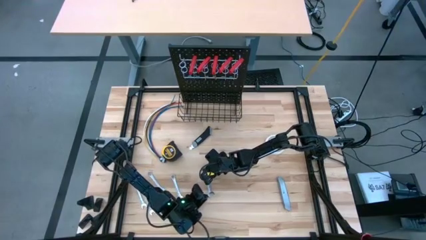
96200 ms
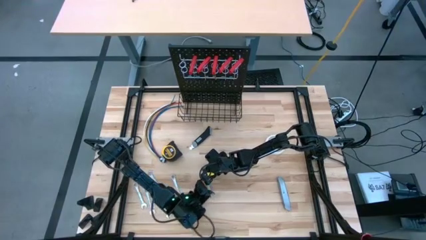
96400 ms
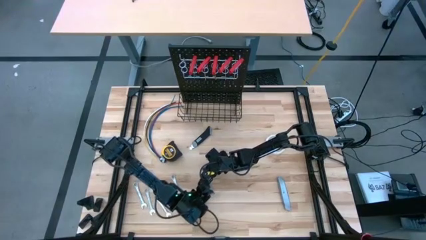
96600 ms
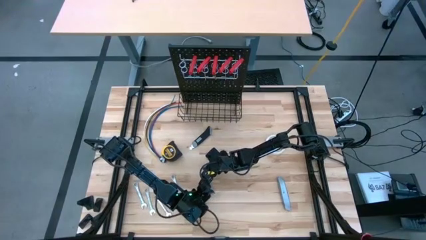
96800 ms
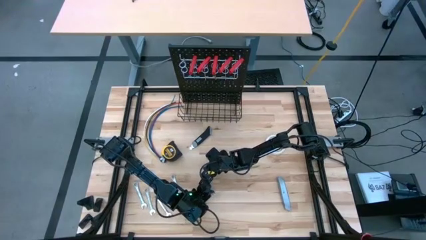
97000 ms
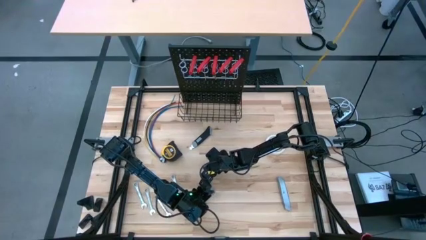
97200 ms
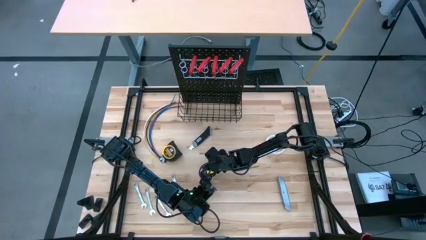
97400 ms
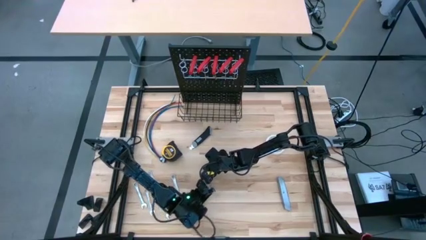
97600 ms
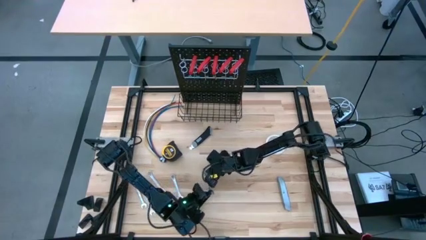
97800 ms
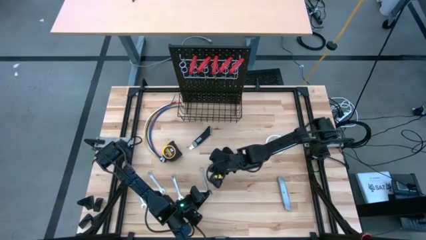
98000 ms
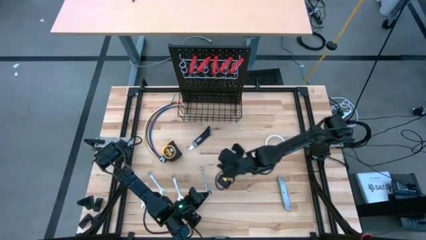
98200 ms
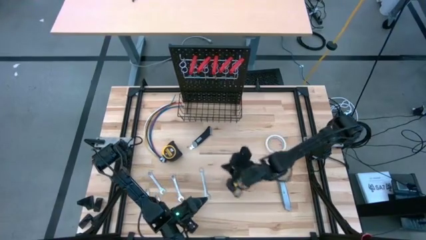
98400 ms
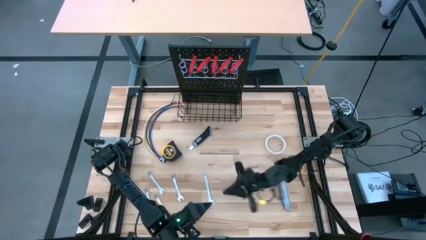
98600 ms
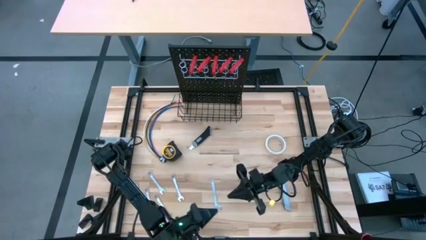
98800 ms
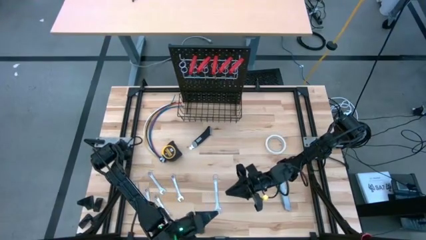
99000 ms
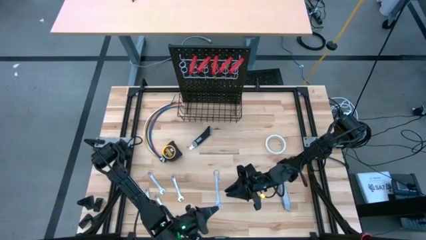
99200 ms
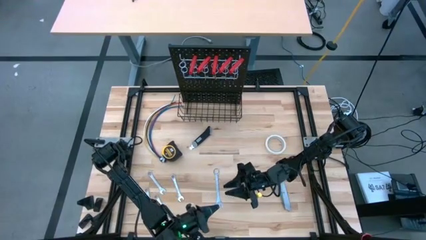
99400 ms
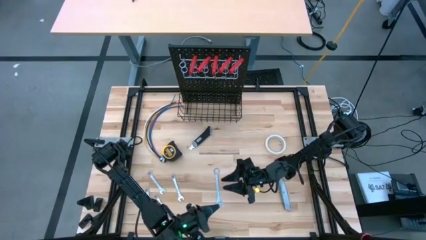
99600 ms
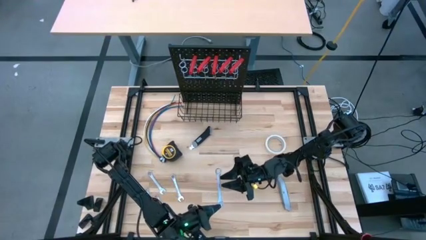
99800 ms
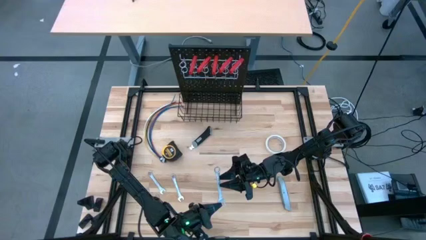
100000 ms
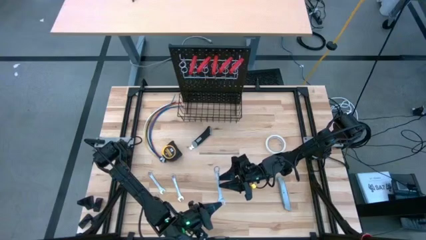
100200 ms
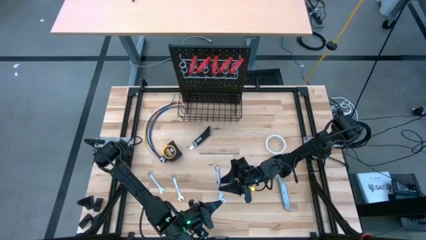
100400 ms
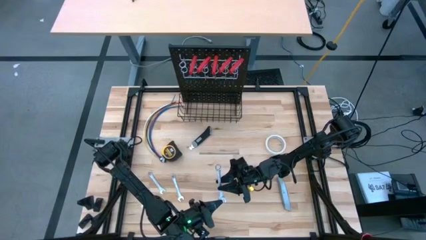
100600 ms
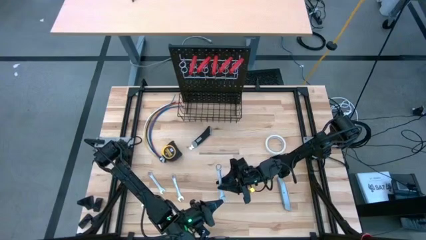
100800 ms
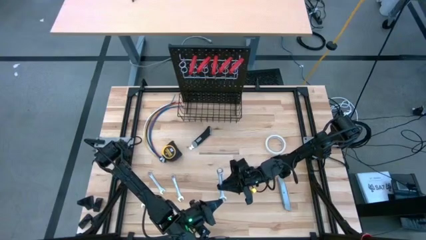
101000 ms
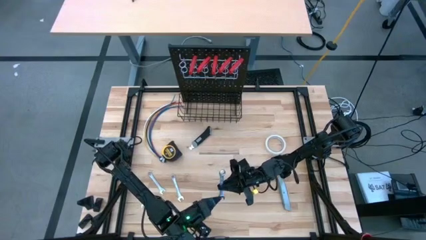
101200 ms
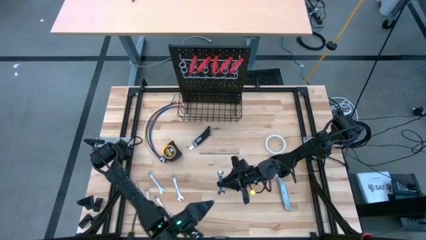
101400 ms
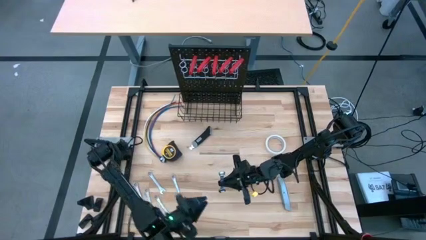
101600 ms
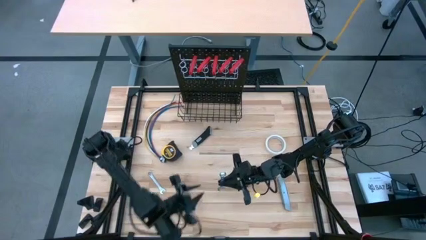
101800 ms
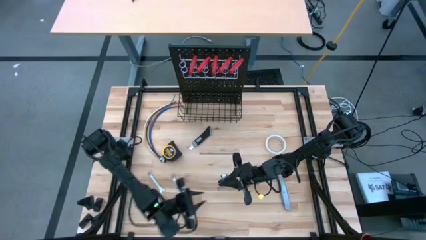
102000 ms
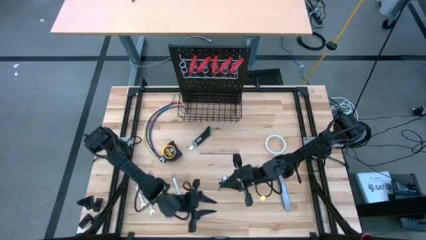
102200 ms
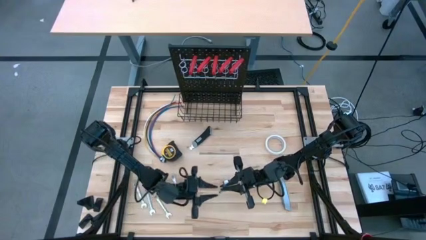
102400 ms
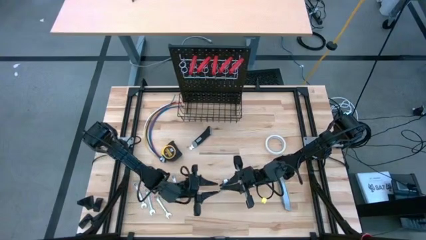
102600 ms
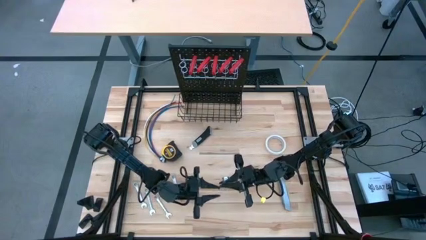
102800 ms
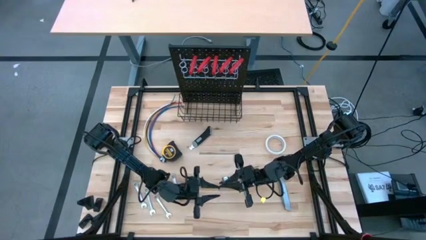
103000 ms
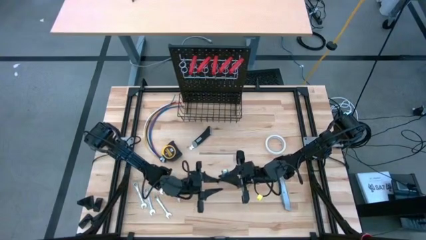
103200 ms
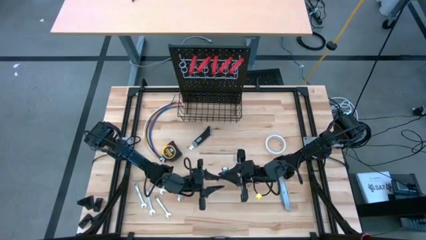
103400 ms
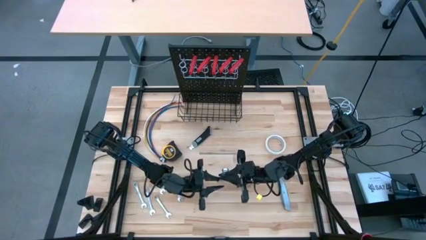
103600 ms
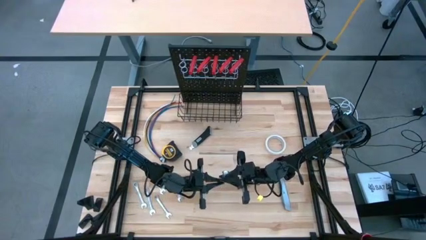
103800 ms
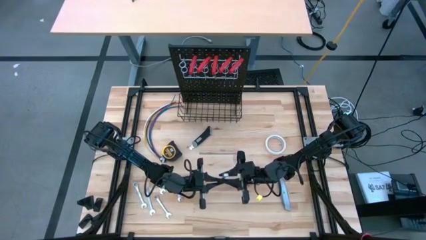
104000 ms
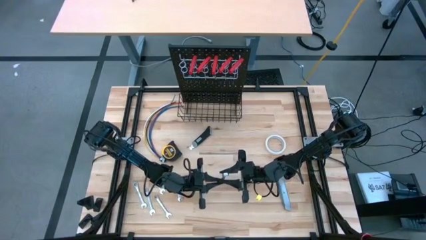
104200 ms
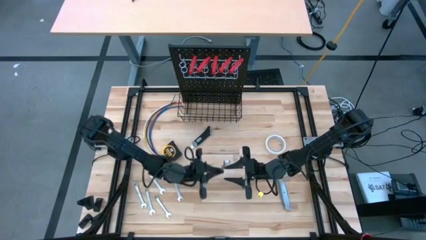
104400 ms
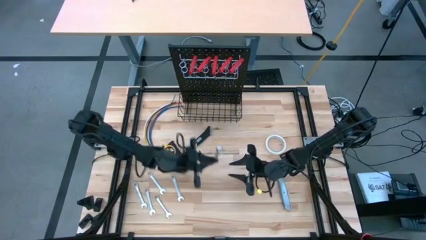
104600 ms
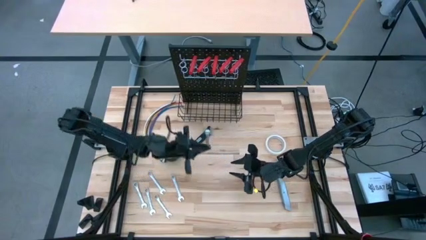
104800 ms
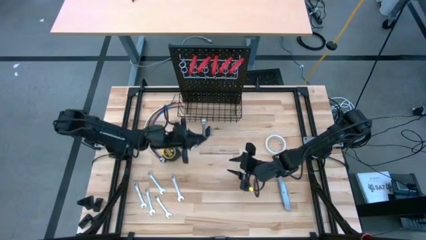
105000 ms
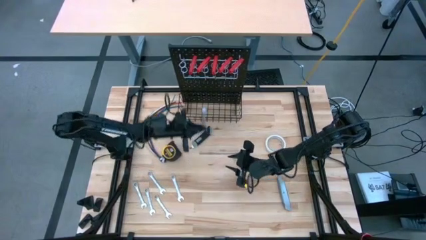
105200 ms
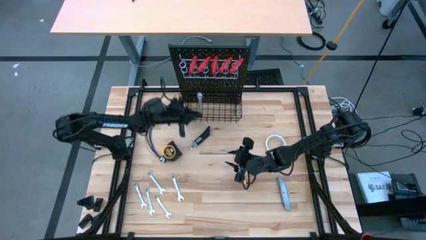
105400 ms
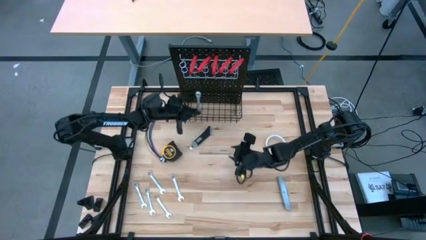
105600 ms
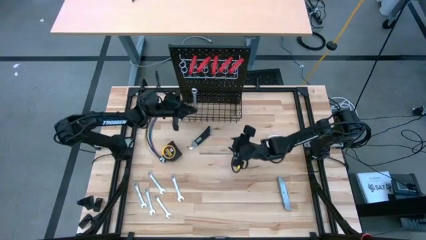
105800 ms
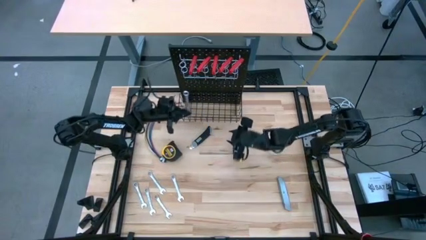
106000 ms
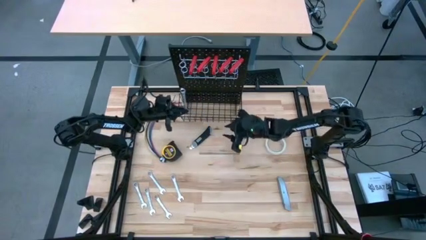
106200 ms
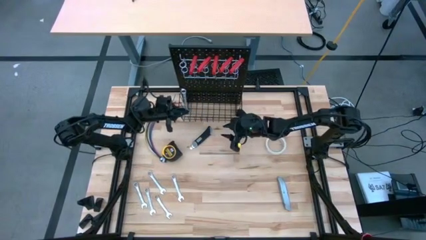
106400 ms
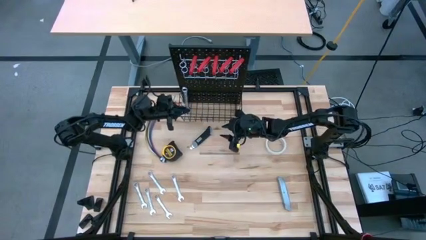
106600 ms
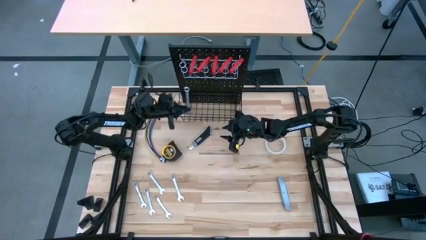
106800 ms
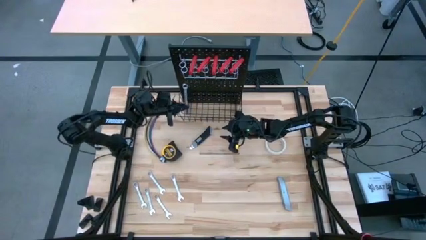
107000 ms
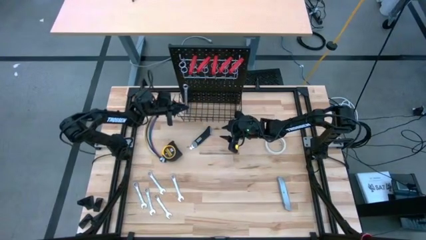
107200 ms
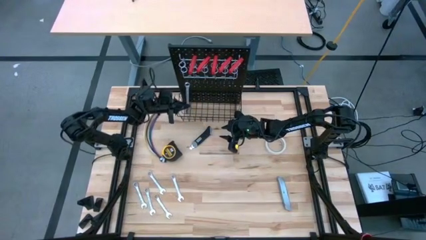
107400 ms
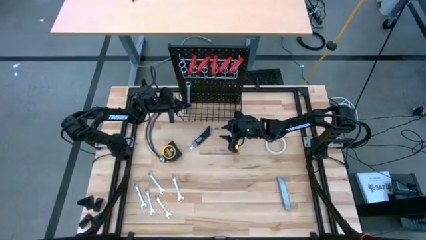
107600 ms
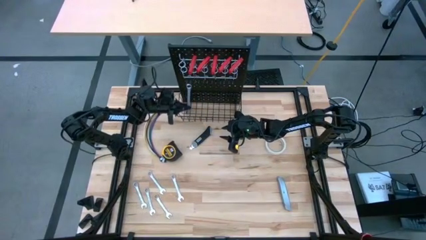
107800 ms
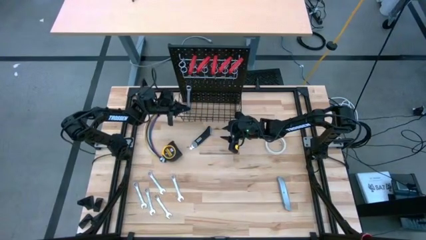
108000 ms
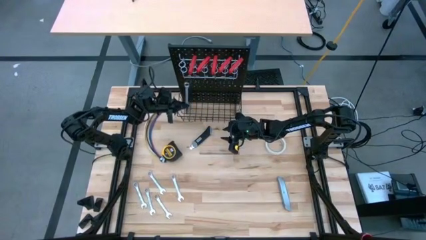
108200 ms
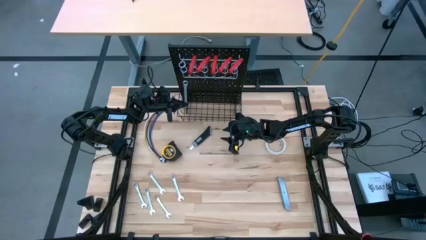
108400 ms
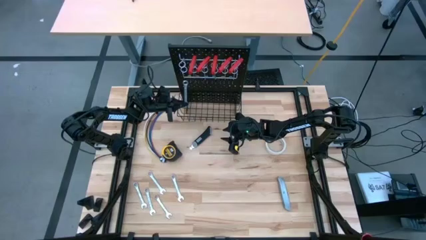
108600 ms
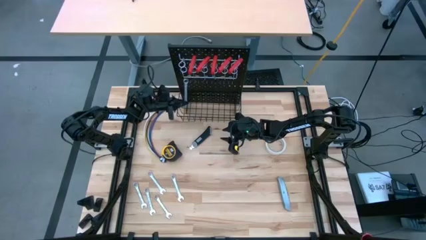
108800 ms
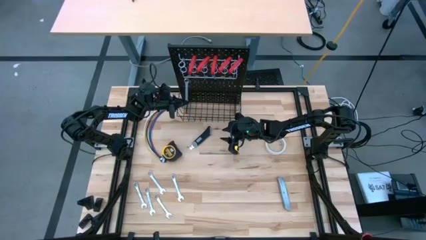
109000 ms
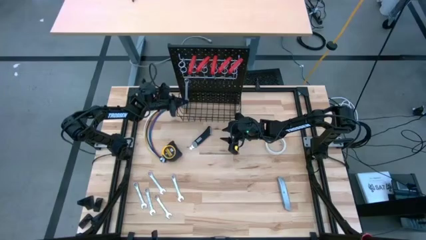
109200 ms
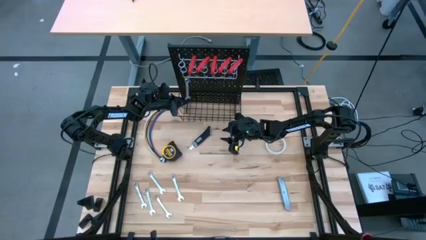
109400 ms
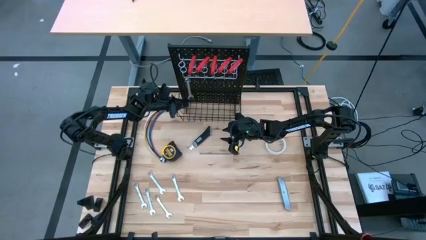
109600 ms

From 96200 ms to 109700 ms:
Task: Hang tools onto peg board
Hang the wrench on the peg board

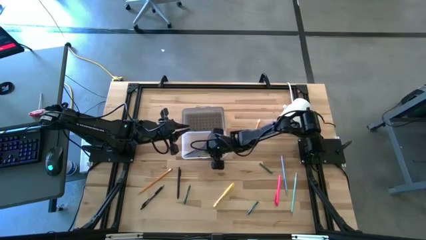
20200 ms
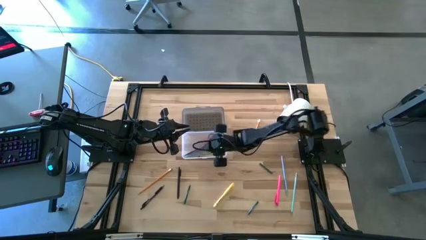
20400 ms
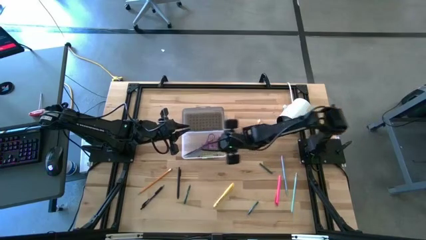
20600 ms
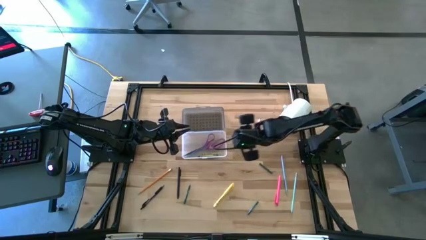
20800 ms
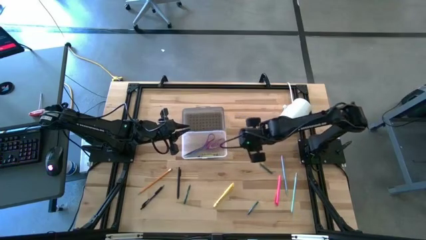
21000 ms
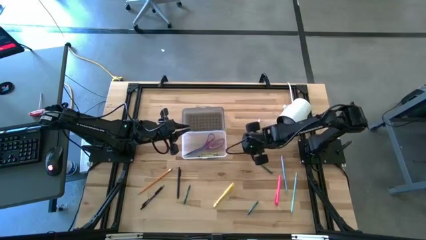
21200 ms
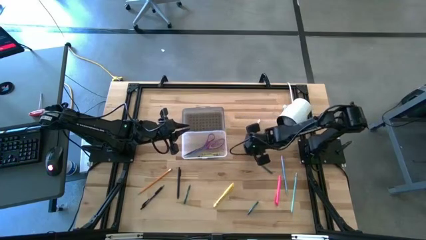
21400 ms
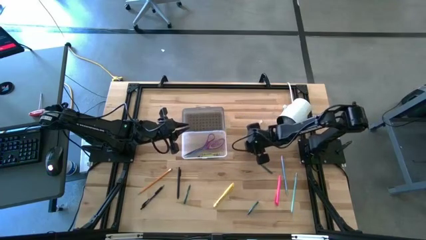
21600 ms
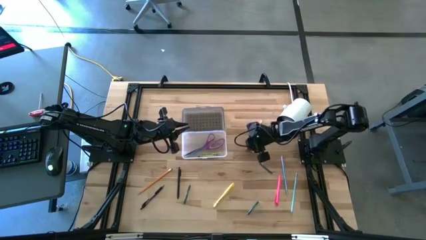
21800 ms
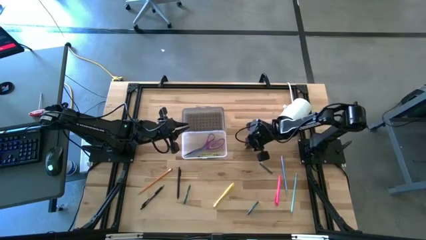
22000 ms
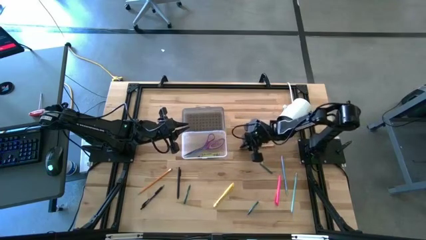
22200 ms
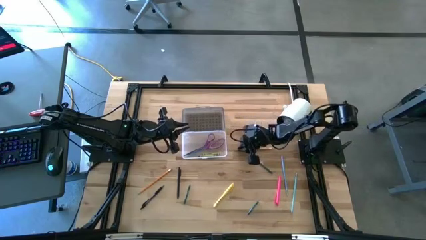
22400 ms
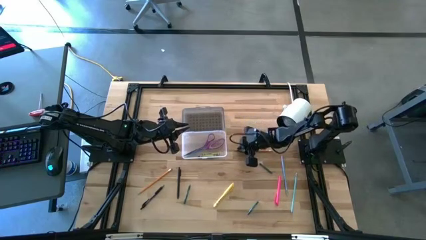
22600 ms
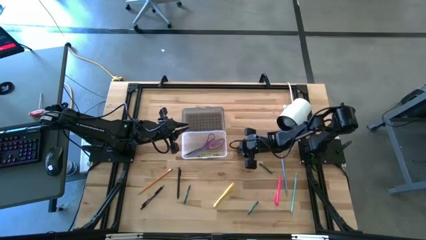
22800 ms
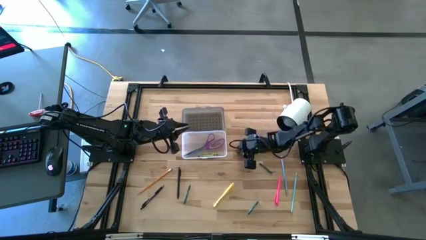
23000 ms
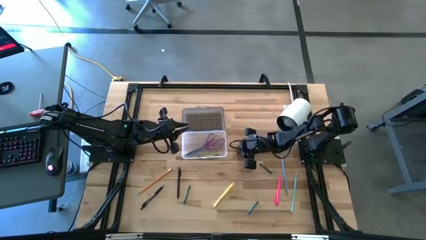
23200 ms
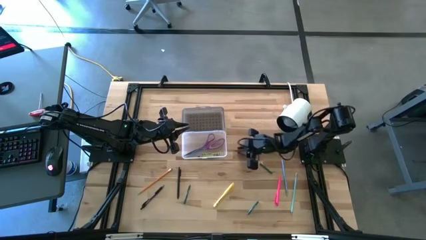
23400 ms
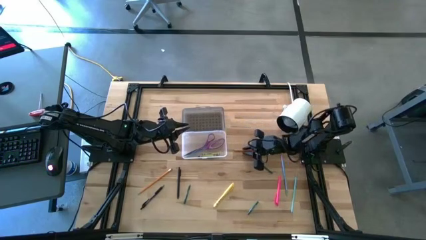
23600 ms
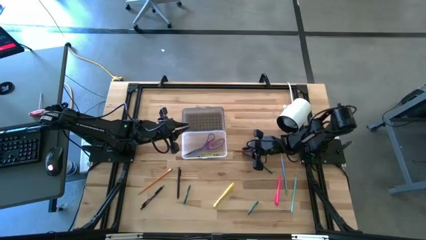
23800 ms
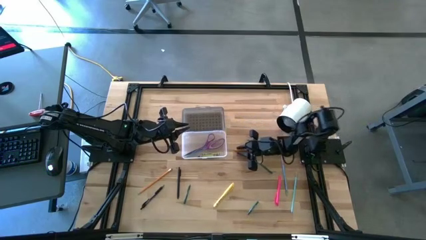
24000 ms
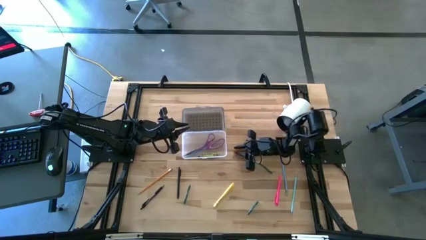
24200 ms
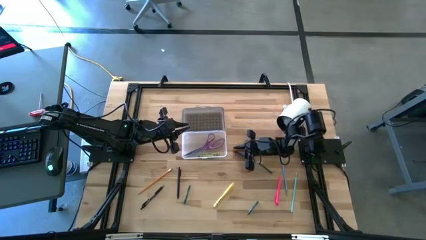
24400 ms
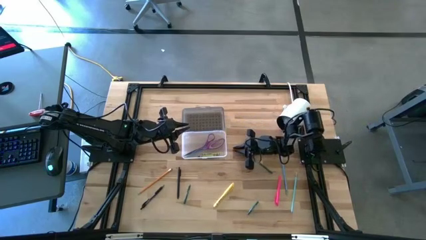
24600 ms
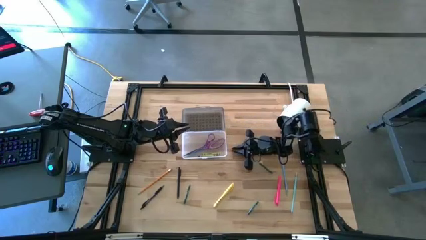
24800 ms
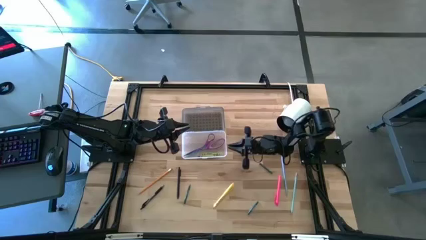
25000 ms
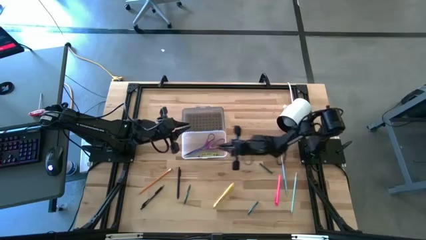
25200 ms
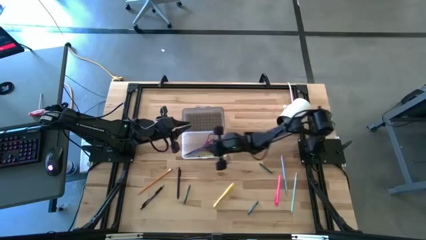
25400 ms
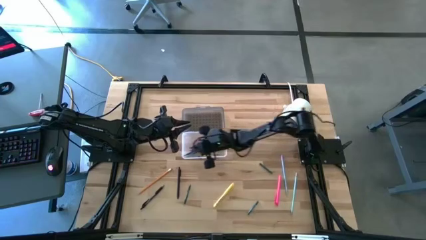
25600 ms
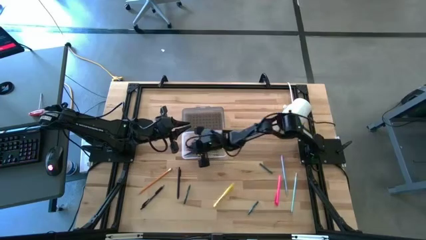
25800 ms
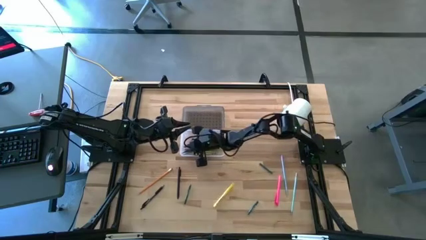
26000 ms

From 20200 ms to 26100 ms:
Task: Pick & place school supplies into a supply box
Put the right orange pencil into the black box
